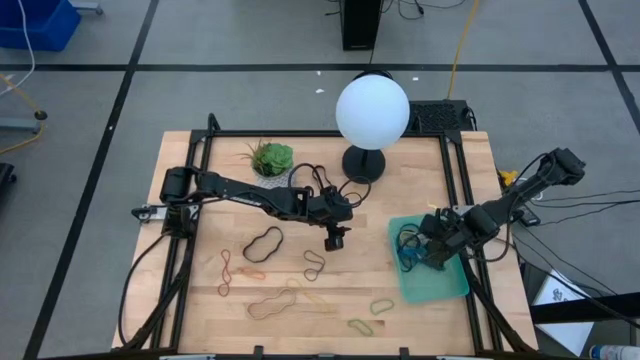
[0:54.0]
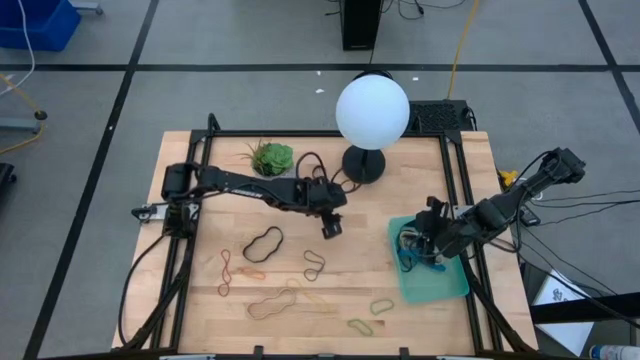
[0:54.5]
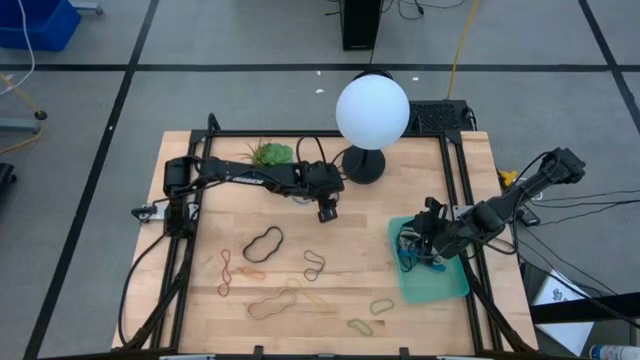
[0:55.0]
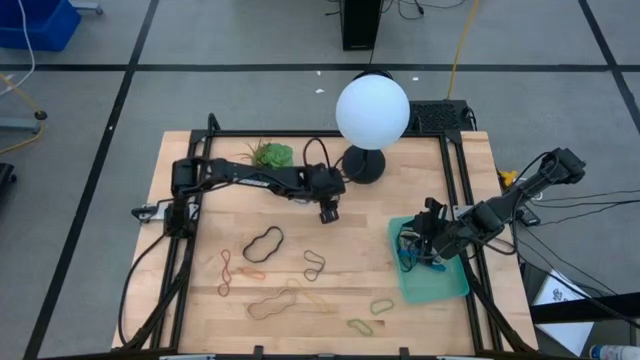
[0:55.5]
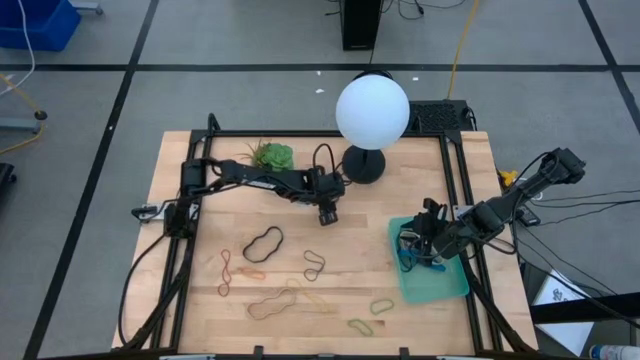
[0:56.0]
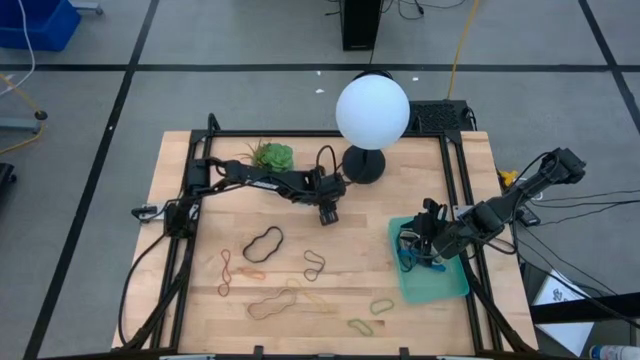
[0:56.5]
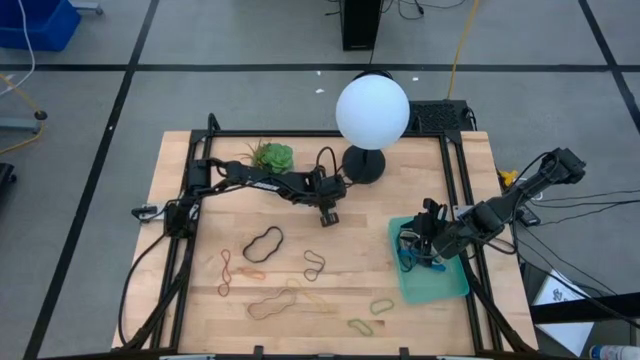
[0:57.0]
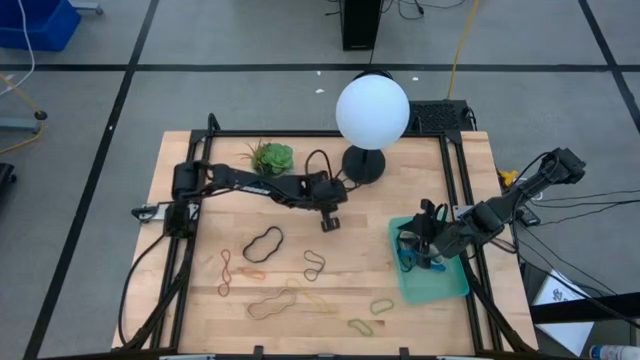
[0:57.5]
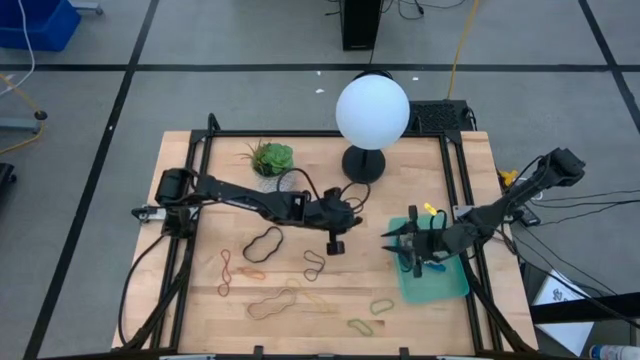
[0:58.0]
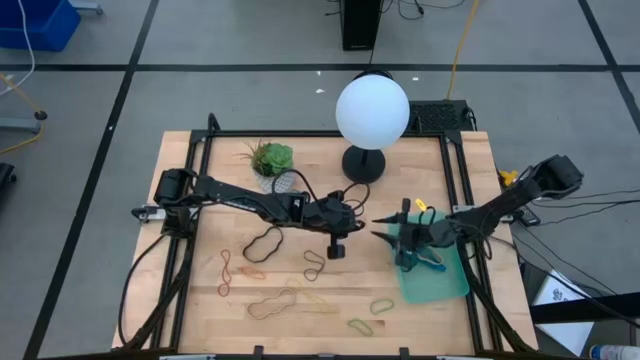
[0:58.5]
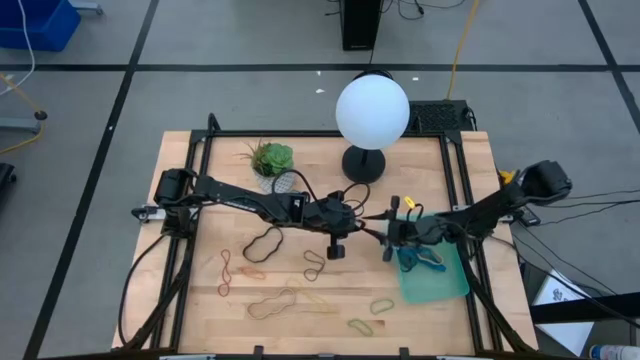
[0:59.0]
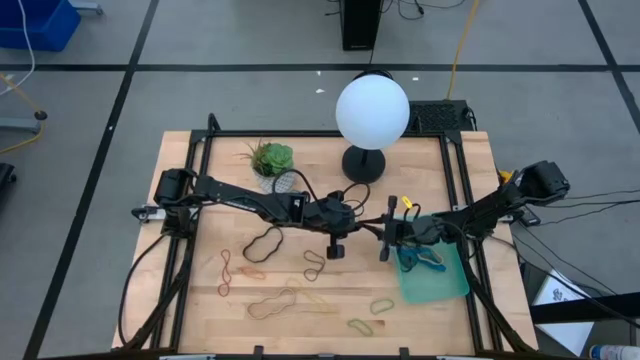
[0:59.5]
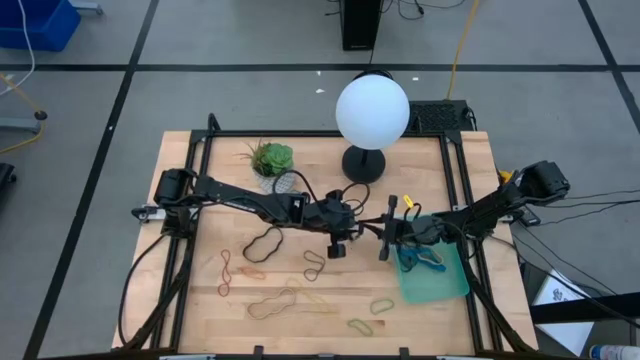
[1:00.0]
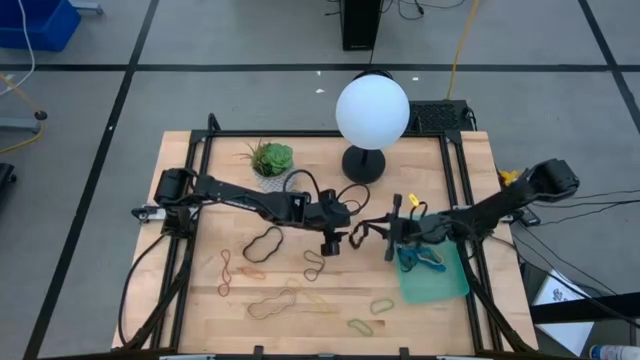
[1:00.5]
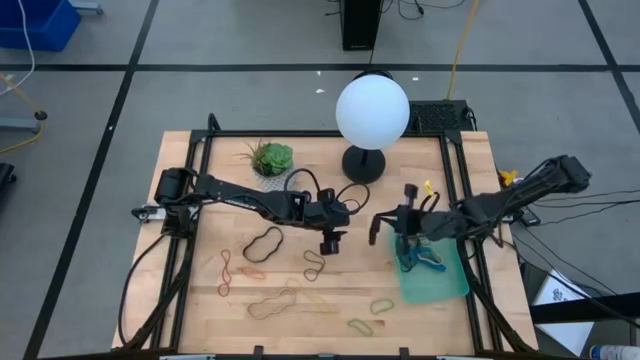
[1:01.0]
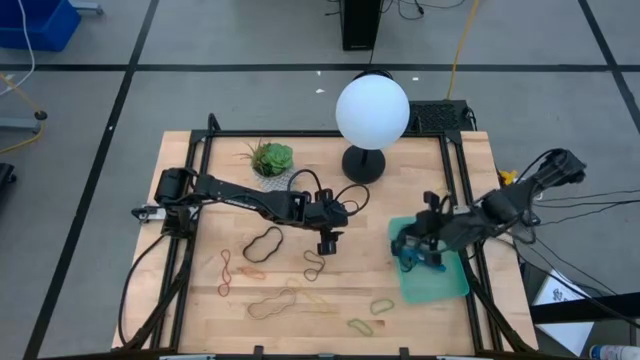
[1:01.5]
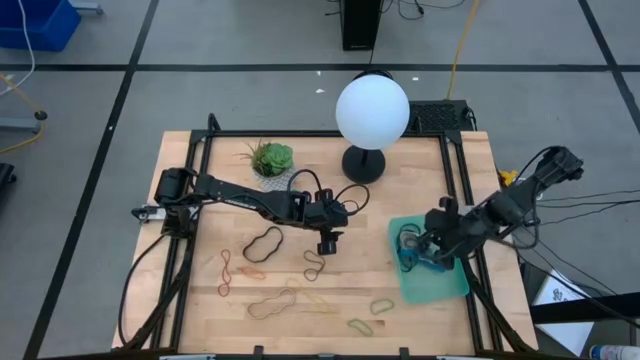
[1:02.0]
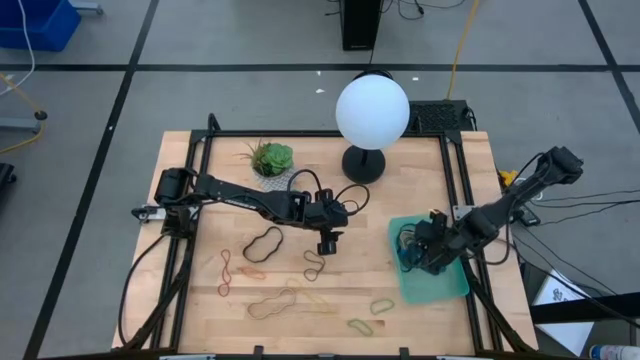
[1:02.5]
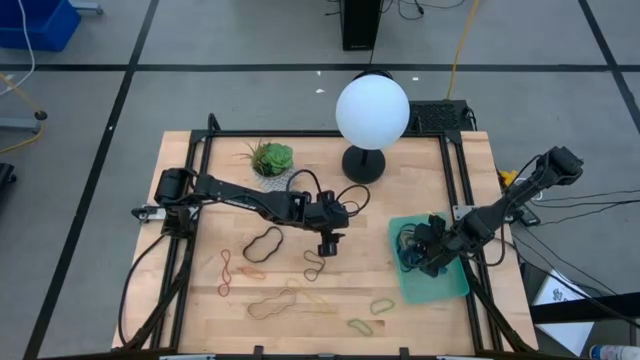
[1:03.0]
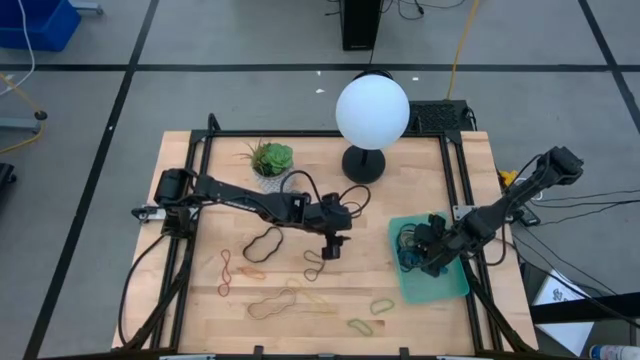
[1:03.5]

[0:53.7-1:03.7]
Task: Pick and place rubber bands into bin
Put the top black rubber band into the bin

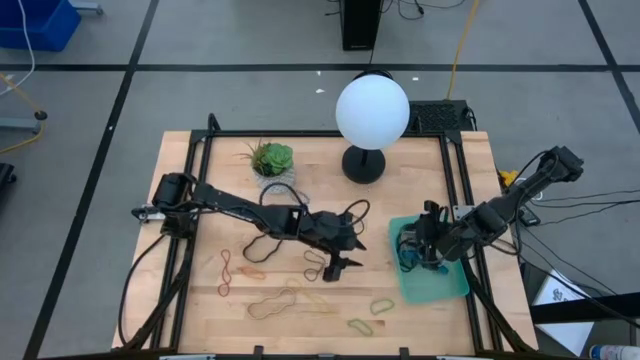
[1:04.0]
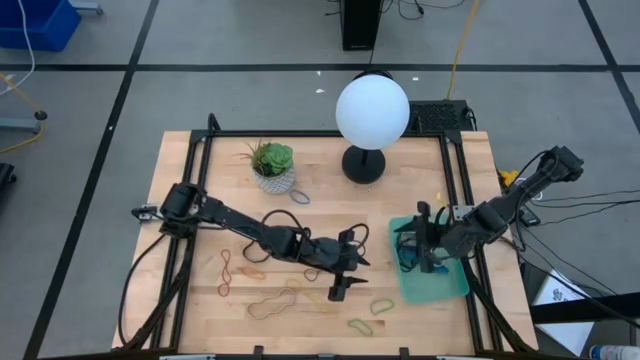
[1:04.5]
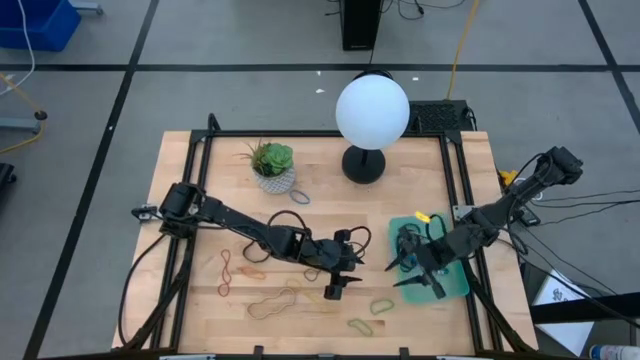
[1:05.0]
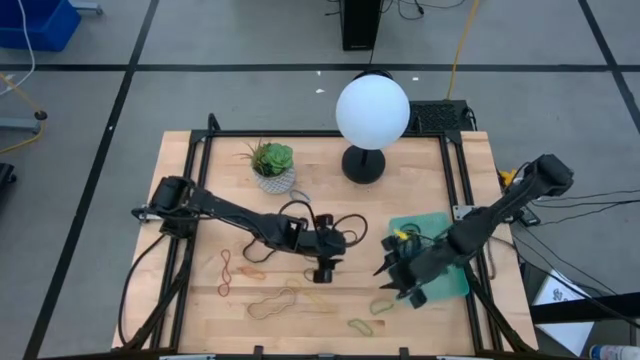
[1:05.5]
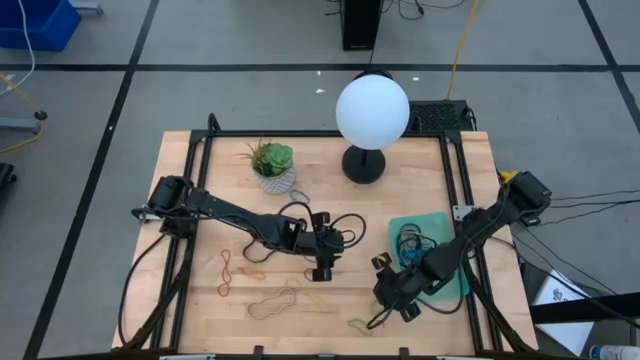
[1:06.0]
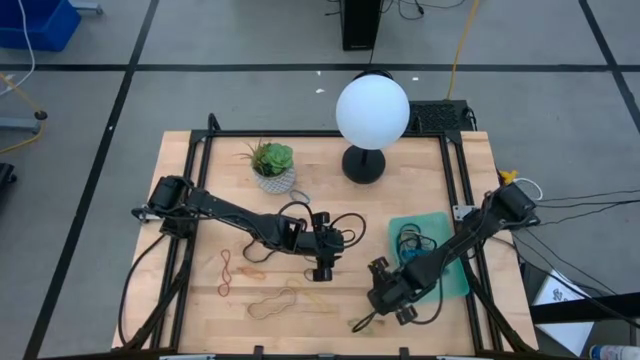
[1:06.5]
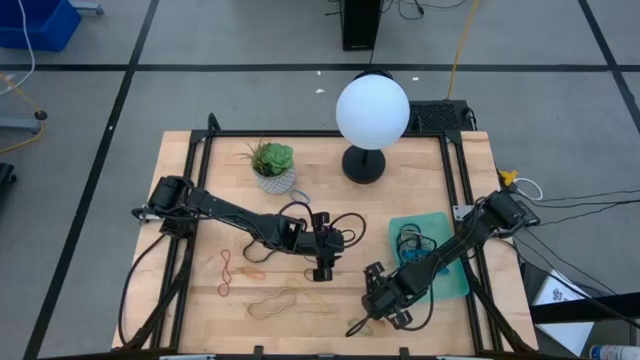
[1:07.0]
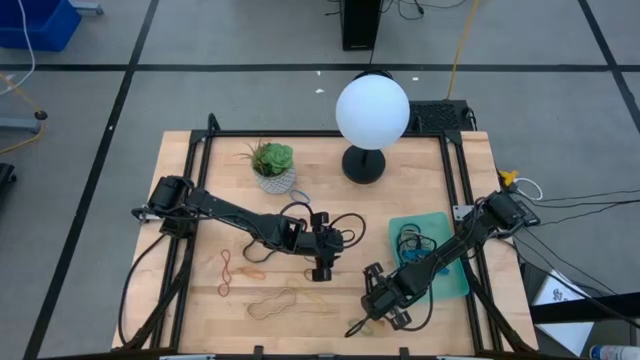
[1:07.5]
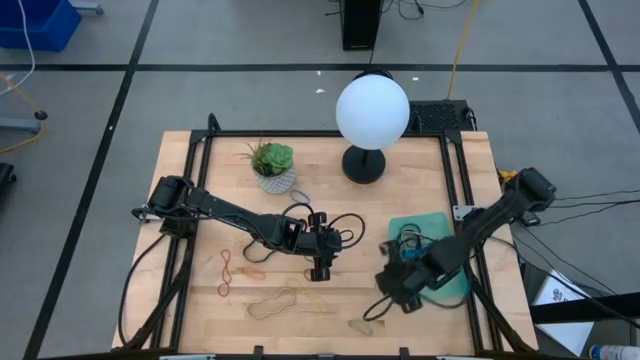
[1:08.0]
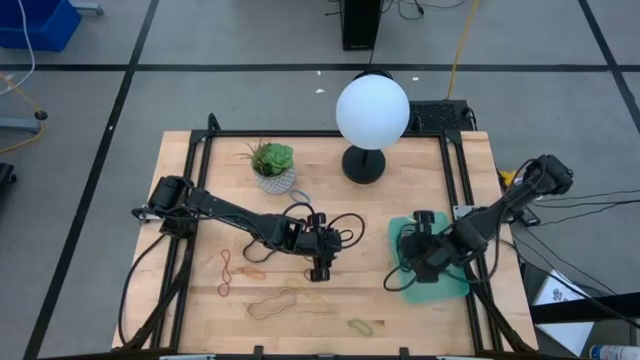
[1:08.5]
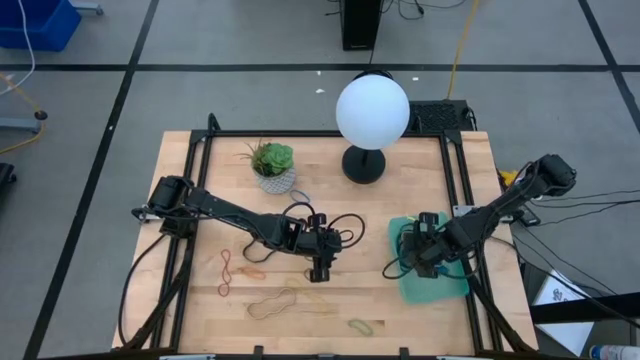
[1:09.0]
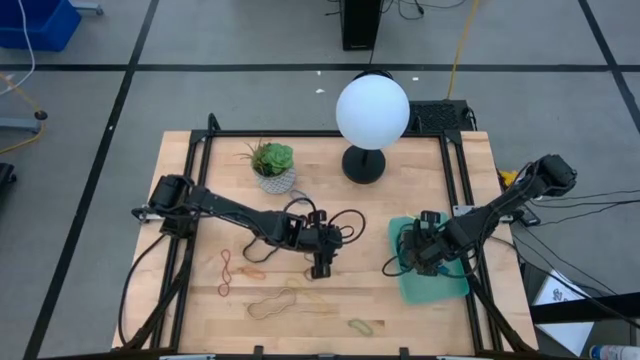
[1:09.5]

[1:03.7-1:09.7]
Put the top green rubber band into the bin

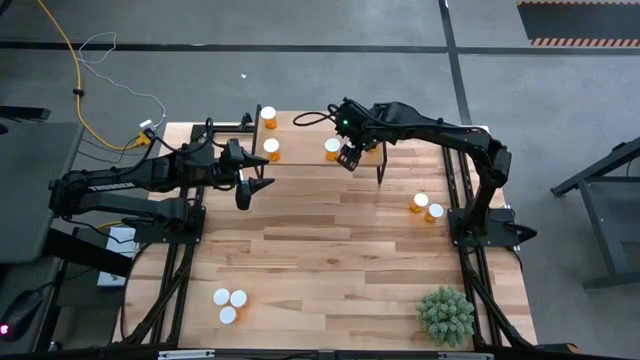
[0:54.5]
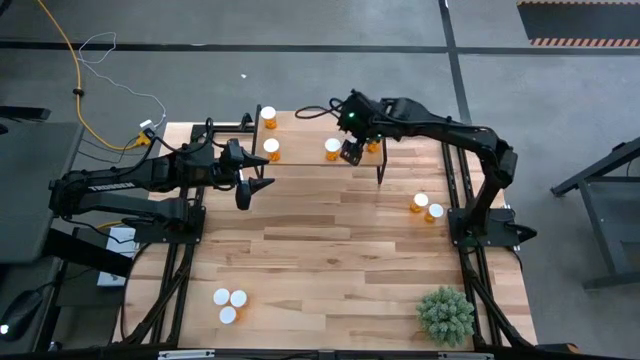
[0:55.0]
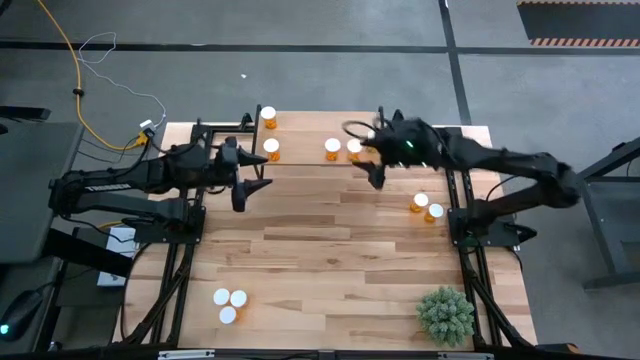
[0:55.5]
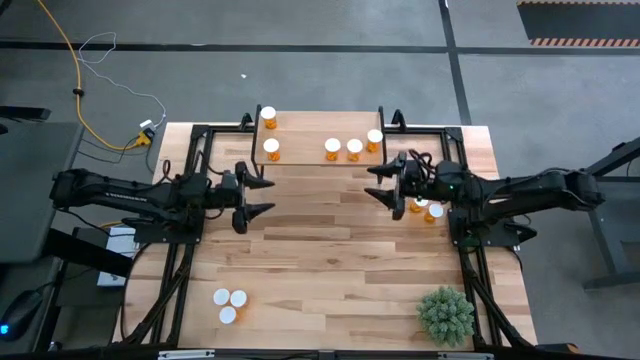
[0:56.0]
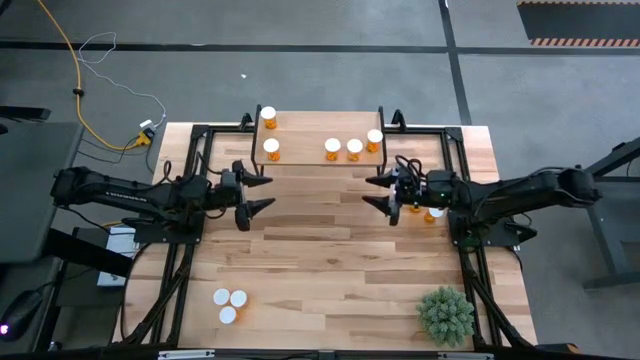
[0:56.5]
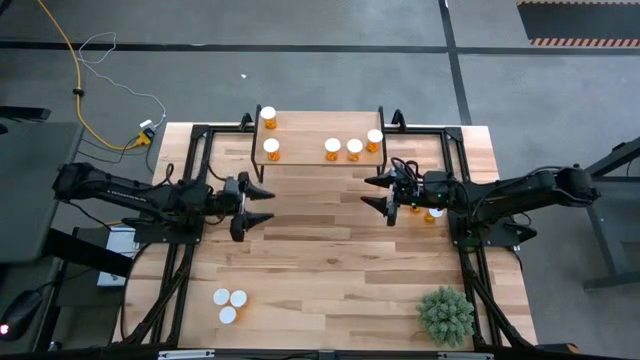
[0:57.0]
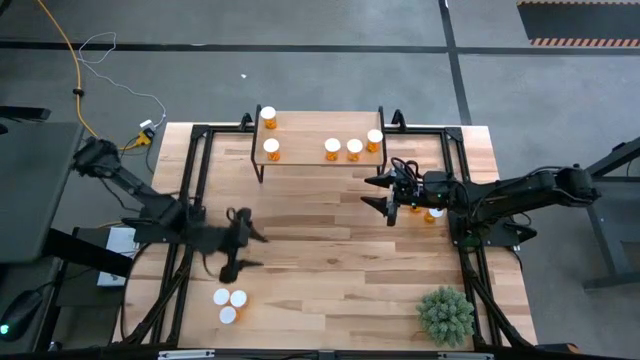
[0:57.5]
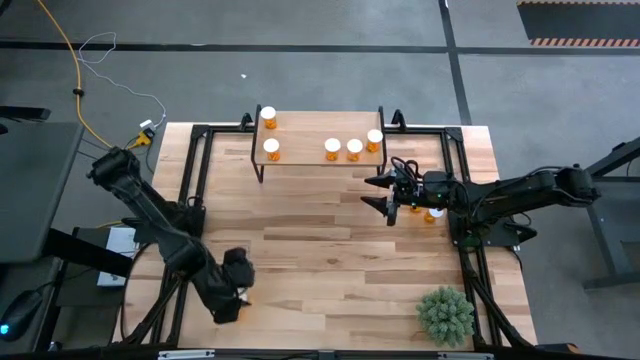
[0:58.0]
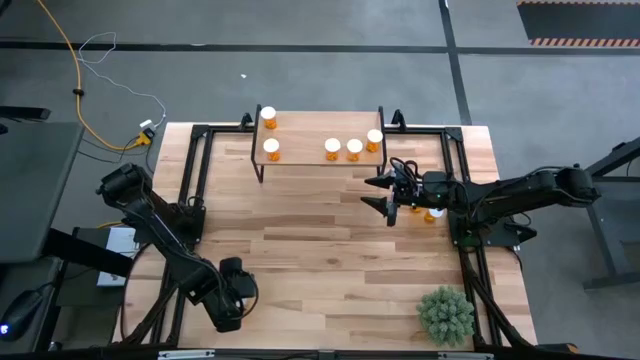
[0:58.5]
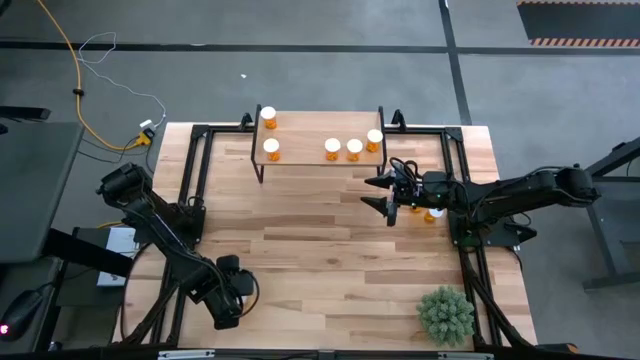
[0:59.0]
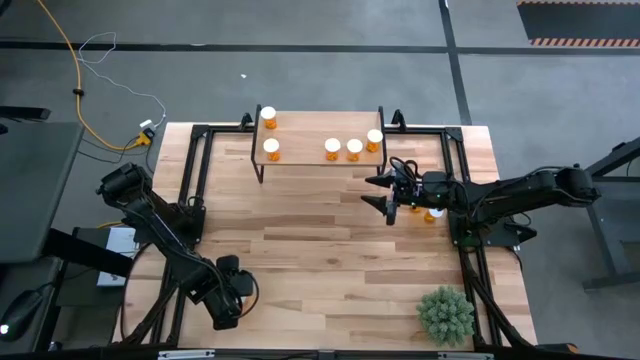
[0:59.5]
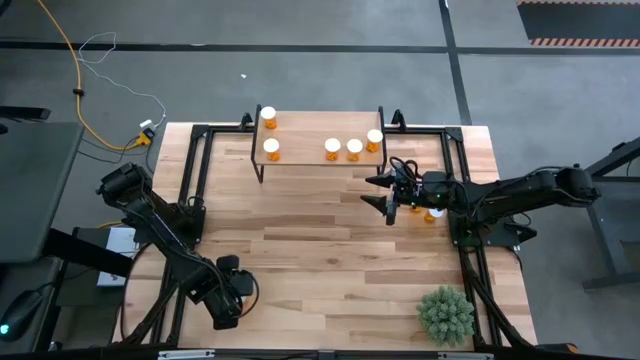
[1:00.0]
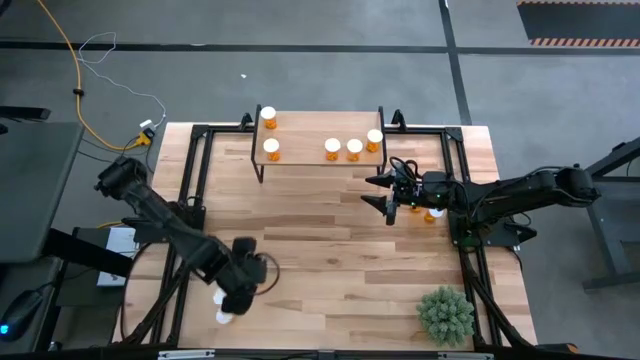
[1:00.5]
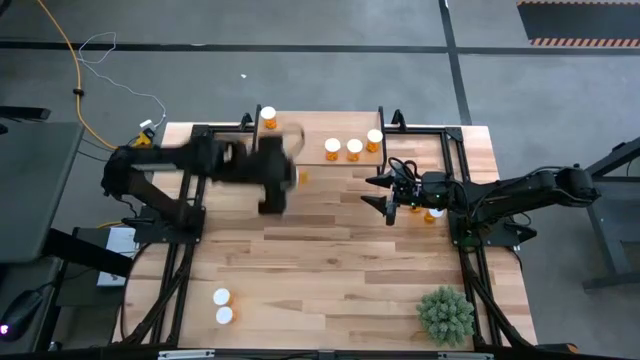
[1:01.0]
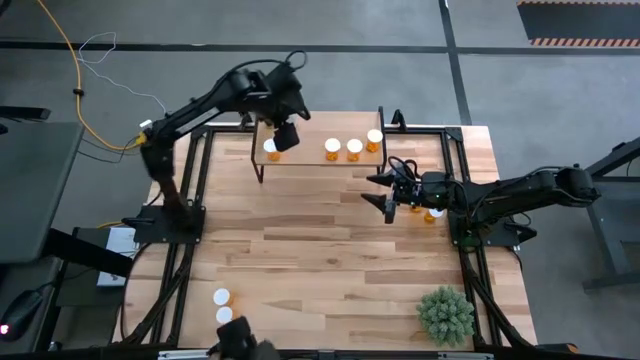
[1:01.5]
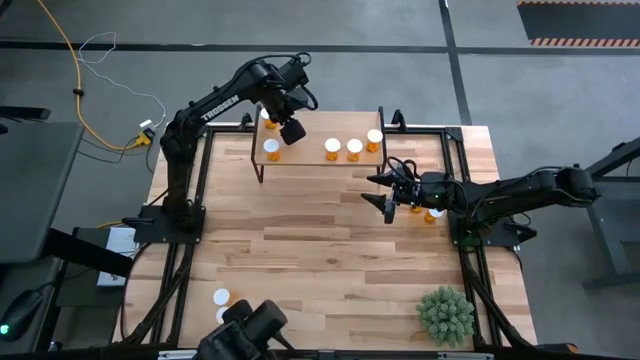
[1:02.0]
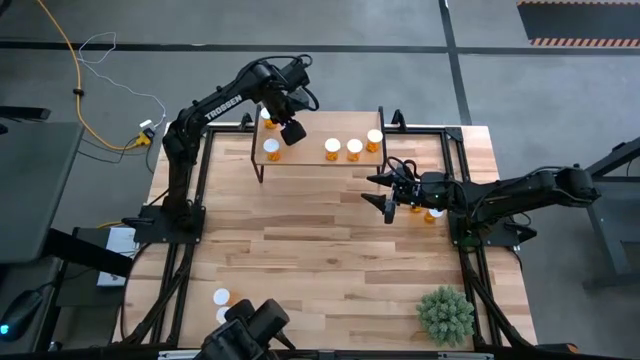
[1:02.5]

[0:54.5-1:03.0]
Task: Pick and place medicine bottles onto shelf by color
Put the orange pill bottle on the shelf
